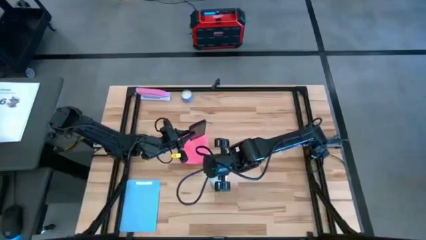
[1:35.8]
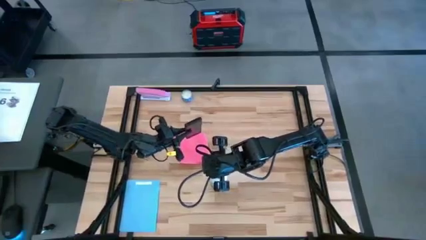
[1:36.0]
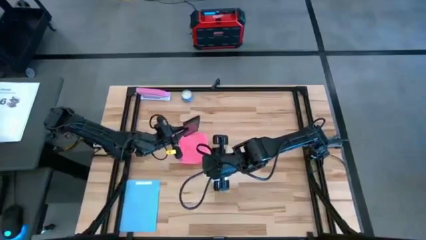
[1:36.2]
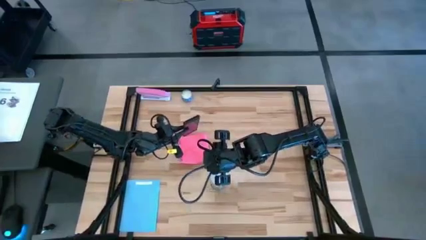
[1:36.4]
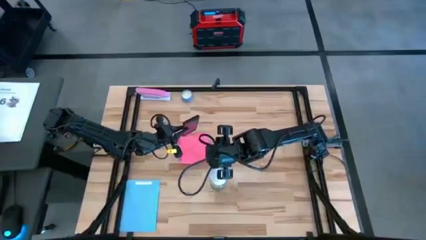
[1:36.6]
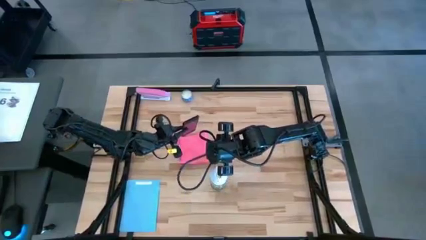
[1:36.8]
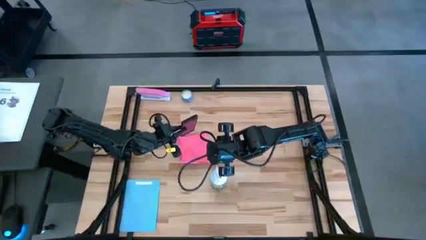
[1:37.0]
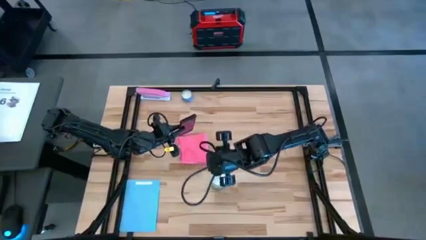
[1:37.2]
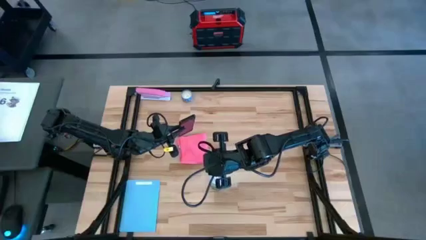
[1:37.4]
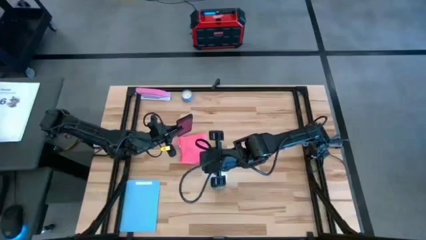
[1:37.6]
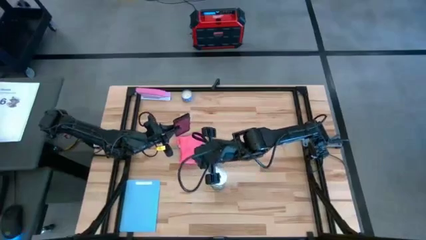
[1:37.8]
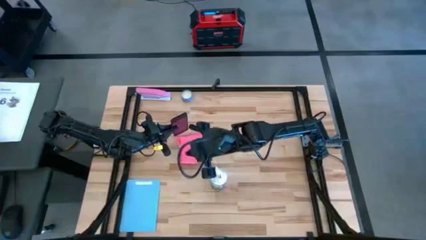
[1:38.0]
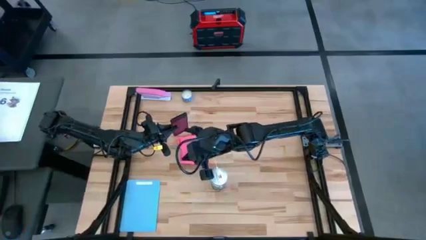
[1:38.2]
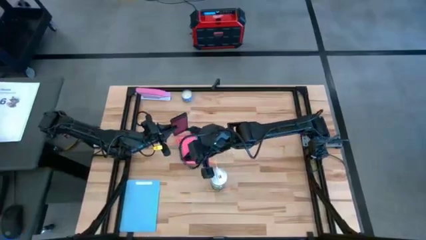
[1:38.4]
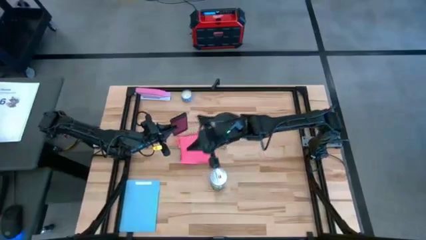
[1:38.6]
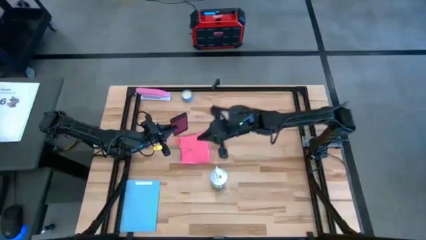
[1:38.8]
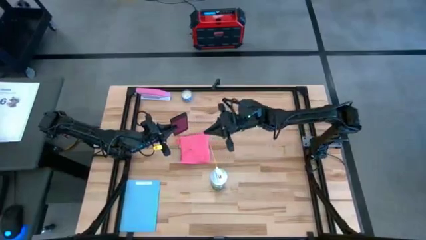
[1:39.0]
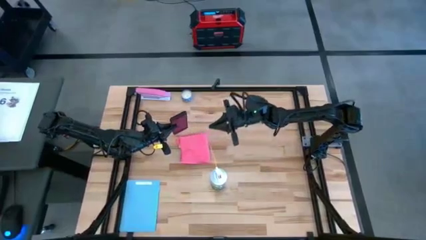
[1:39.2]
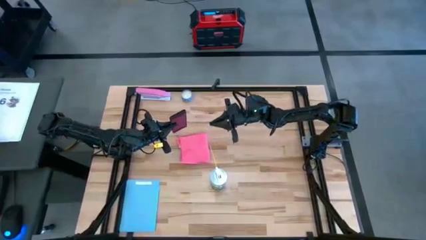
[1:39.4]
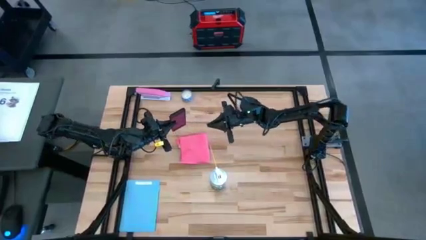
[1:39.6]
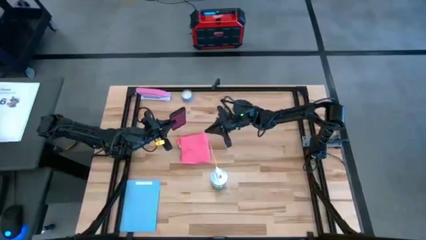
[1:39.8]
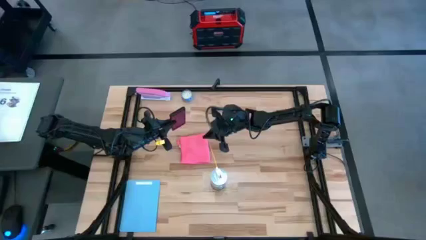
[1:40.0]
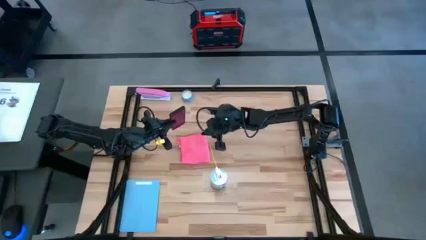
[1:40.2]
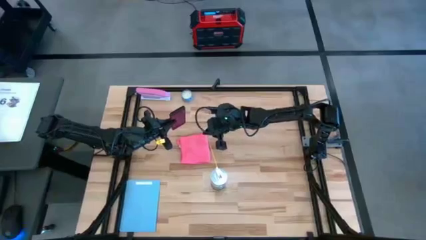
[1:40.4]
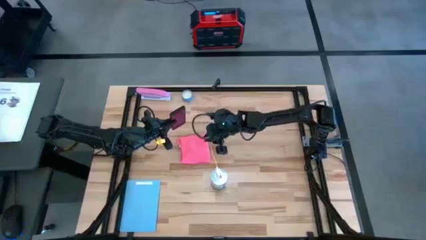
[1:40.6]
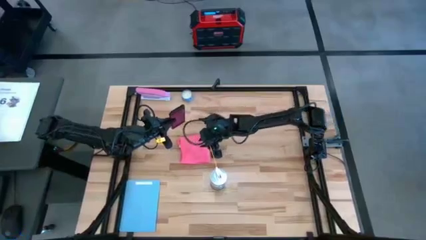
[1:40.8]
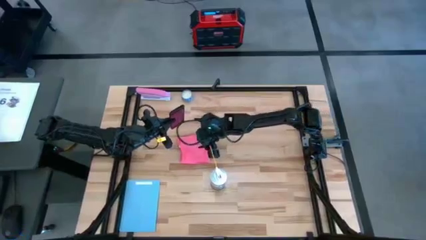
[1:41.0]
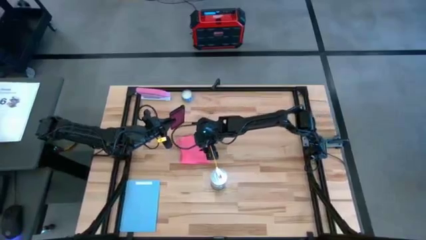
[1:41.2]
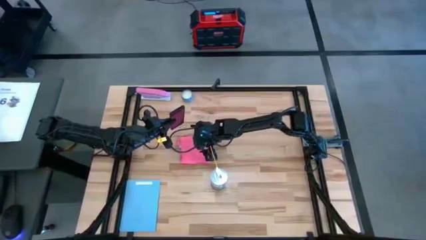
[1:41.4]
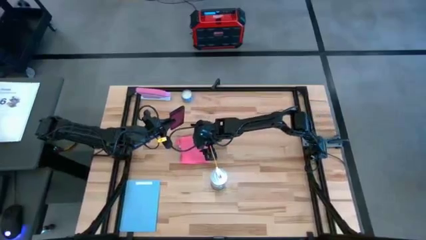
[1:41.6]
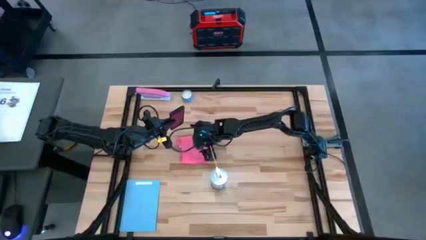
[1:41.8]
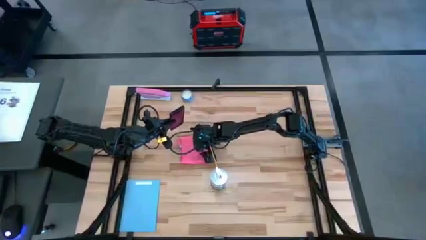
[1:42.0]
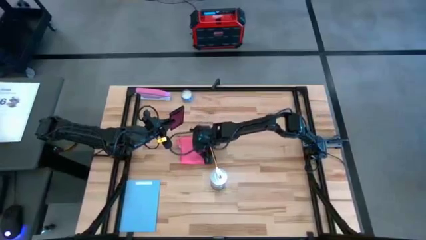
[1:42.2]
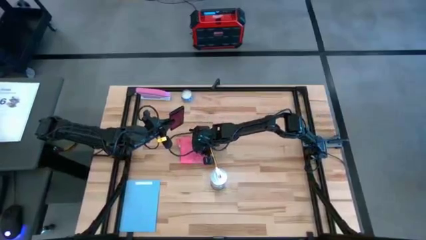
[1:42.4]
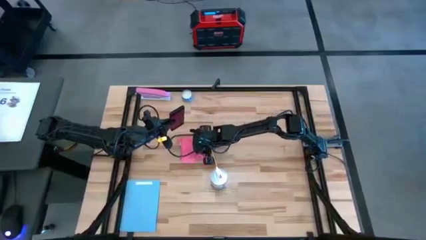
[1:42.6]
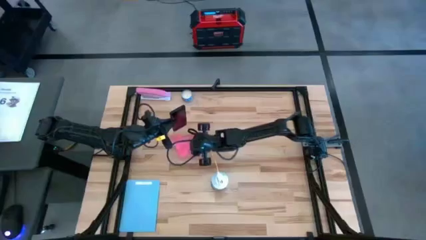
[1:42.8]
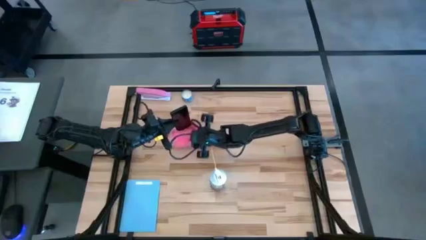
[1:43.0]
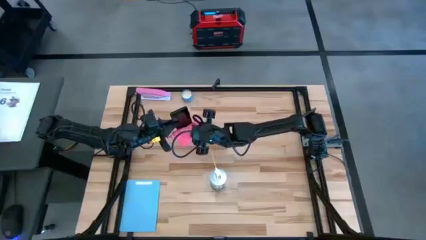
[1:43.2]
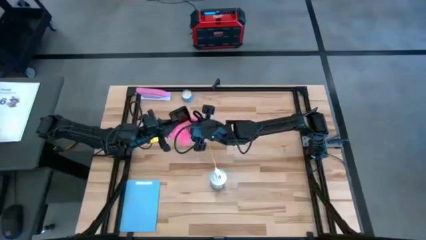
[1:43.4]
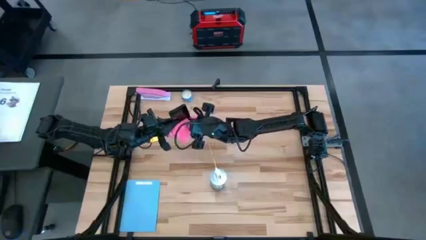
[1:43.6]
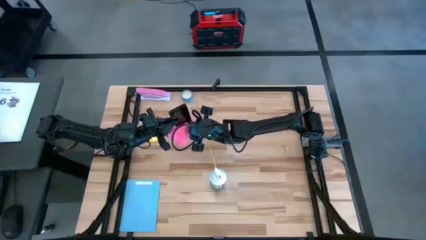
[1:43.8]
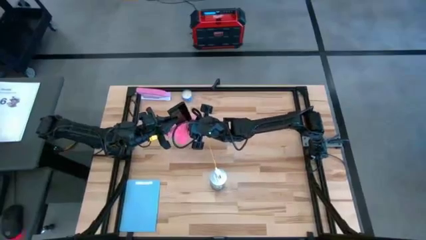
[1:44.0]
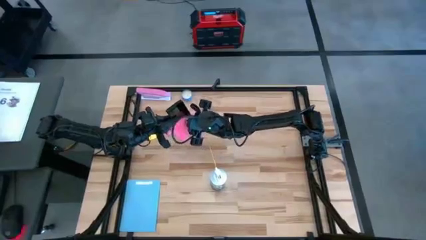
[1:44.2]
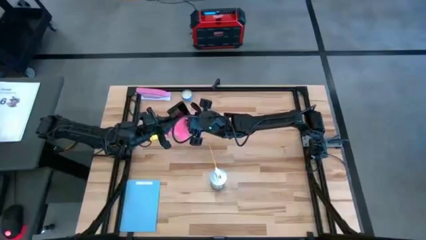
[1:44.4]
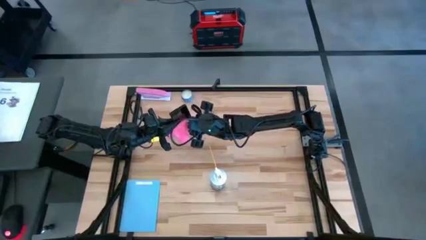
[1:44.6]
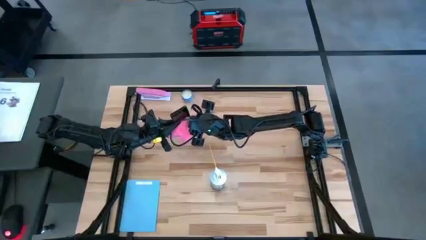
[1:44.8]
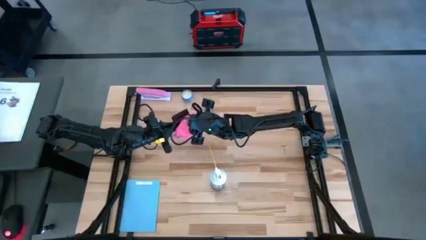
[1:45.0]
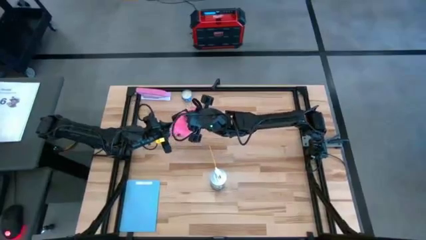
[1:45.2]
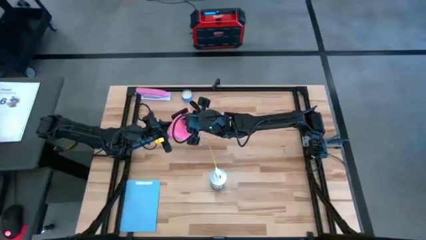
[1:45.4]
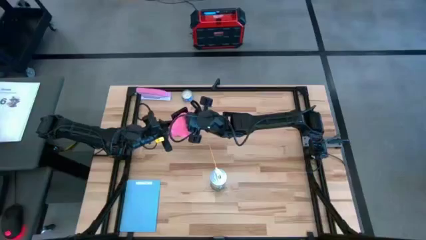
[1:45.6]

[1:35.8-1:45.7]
Task: Apply microfiber cloth
Wipe the front of the black cellphone with the pink microfiber cloth
